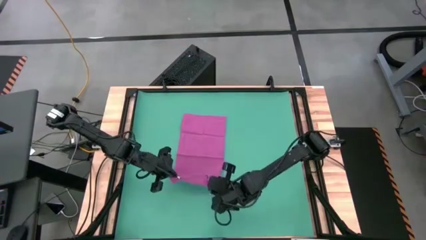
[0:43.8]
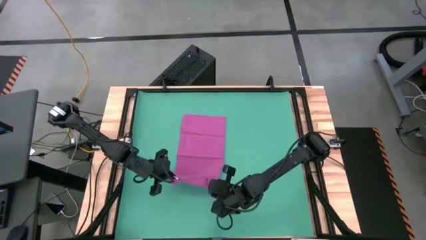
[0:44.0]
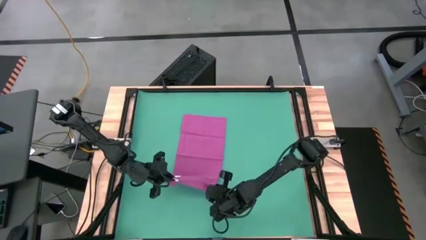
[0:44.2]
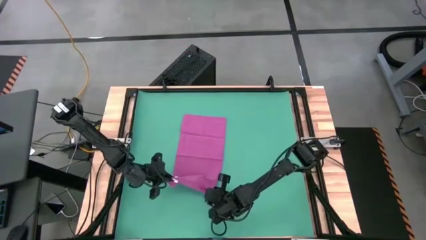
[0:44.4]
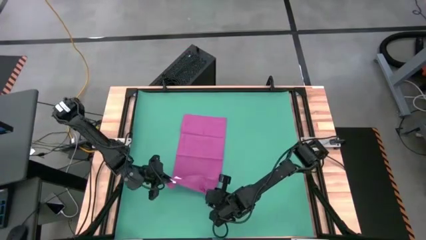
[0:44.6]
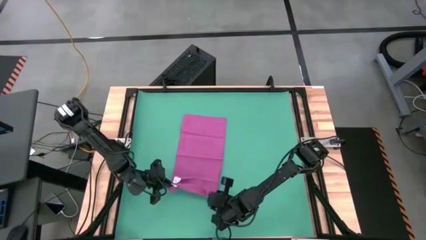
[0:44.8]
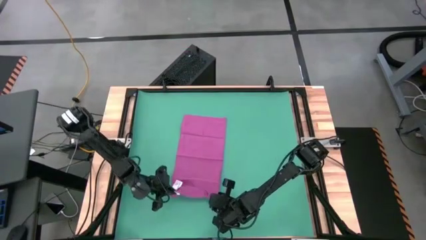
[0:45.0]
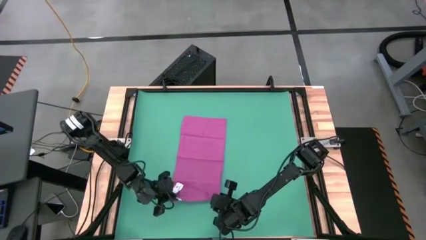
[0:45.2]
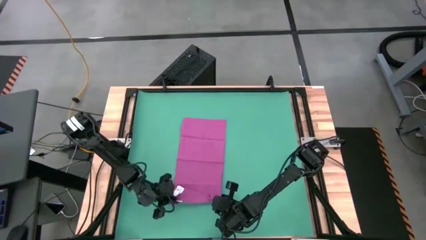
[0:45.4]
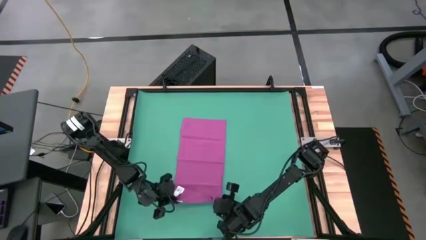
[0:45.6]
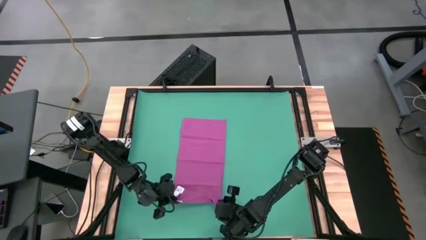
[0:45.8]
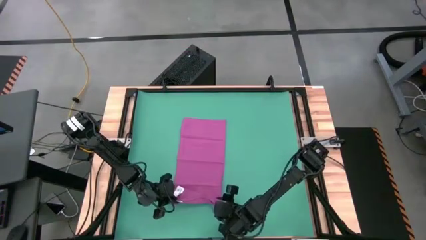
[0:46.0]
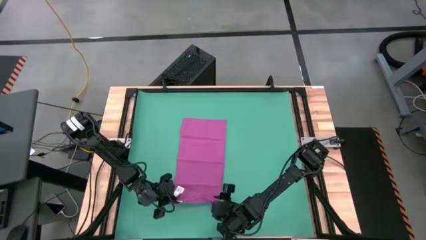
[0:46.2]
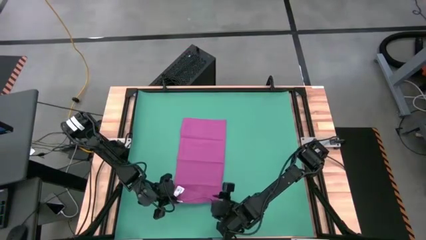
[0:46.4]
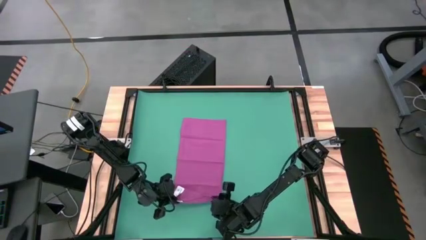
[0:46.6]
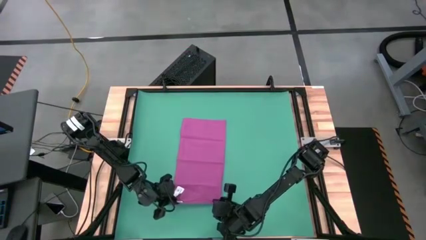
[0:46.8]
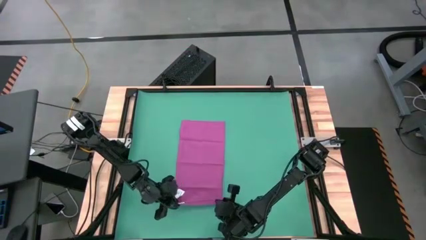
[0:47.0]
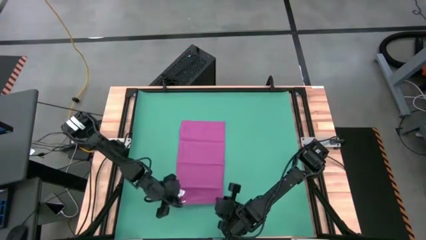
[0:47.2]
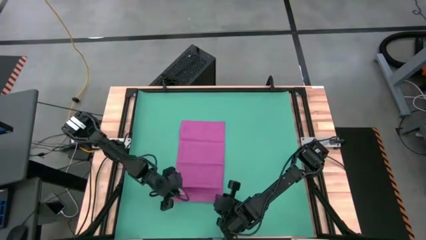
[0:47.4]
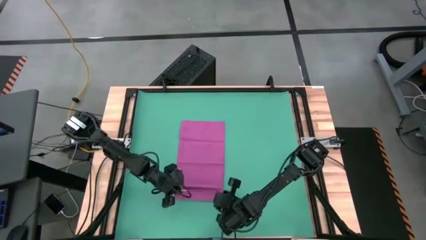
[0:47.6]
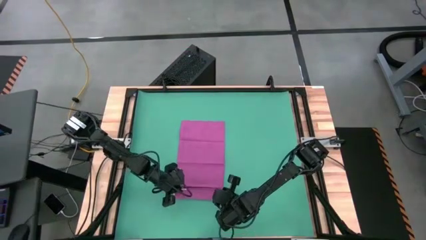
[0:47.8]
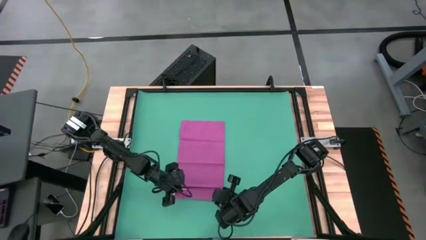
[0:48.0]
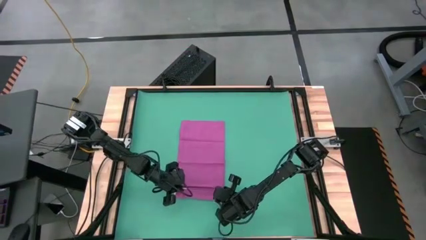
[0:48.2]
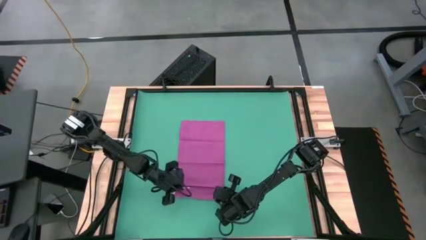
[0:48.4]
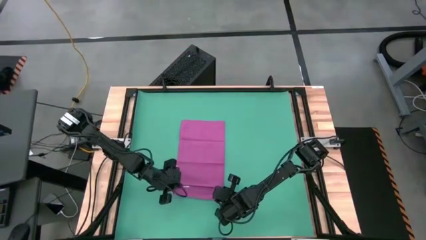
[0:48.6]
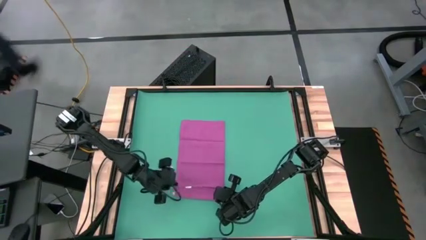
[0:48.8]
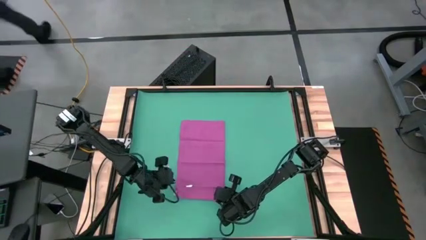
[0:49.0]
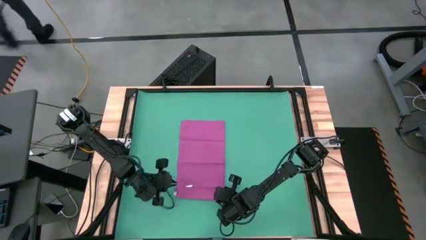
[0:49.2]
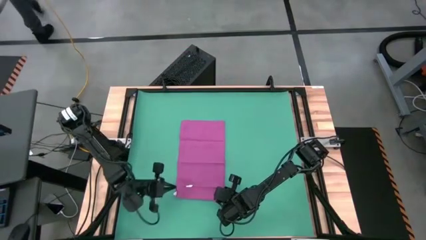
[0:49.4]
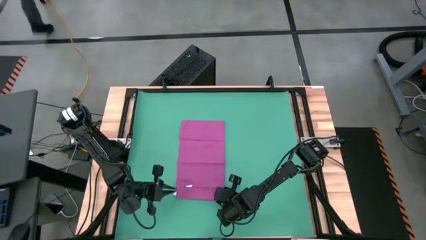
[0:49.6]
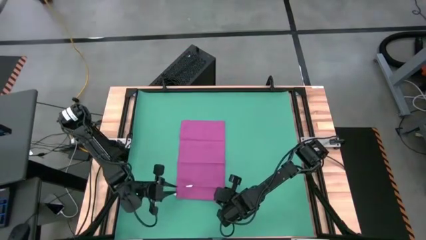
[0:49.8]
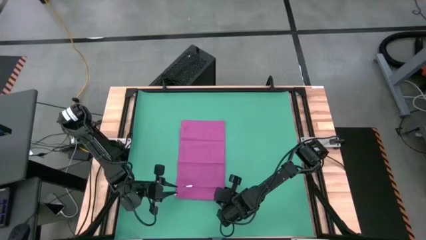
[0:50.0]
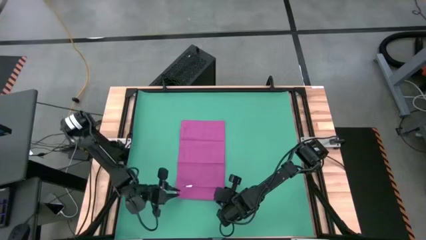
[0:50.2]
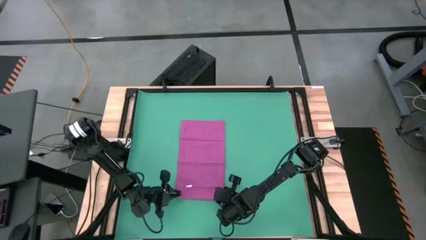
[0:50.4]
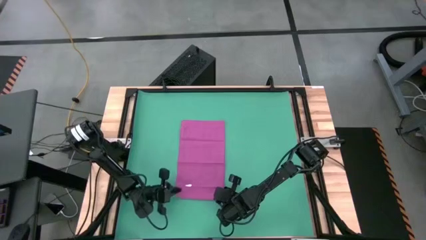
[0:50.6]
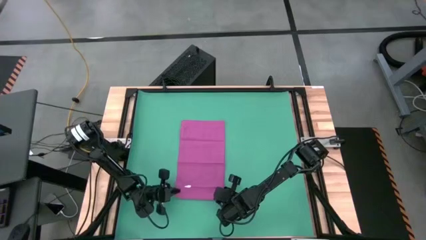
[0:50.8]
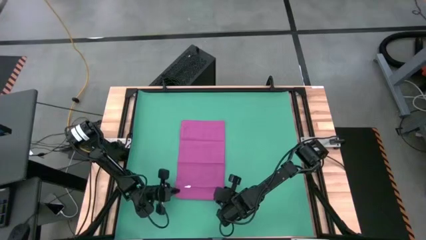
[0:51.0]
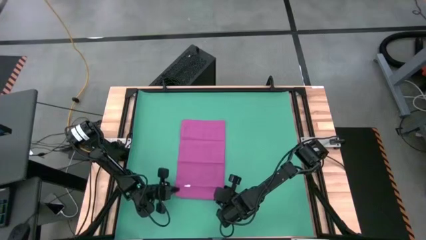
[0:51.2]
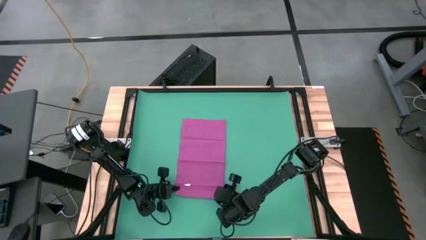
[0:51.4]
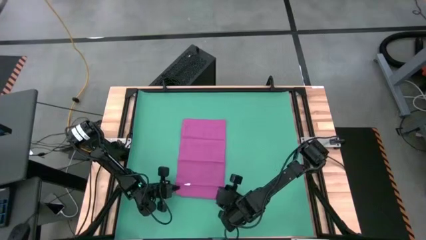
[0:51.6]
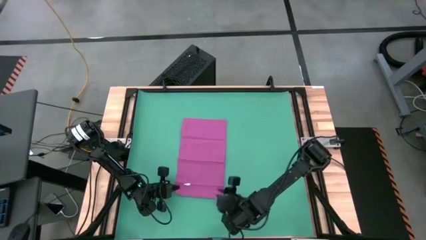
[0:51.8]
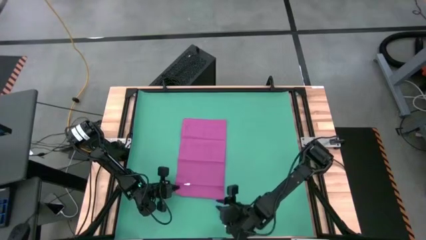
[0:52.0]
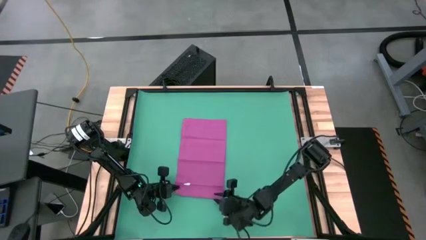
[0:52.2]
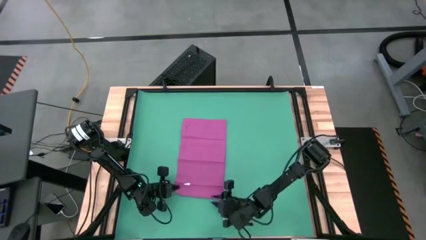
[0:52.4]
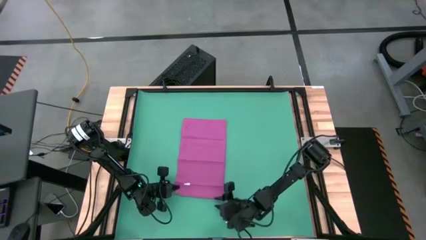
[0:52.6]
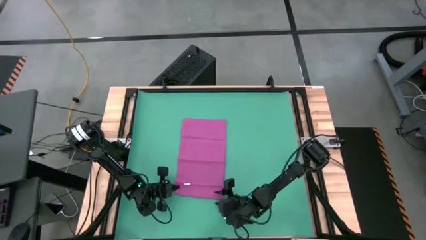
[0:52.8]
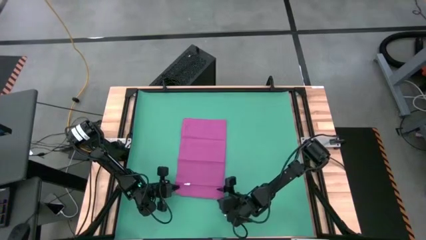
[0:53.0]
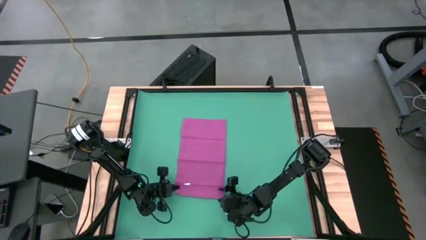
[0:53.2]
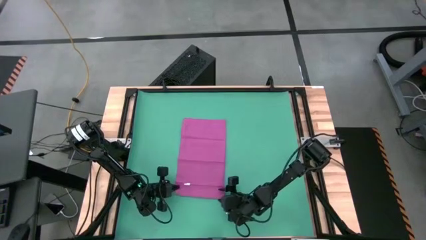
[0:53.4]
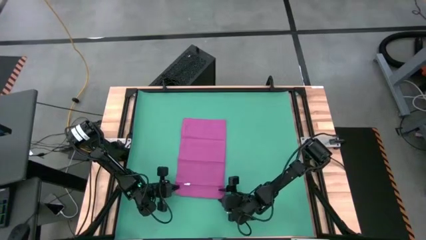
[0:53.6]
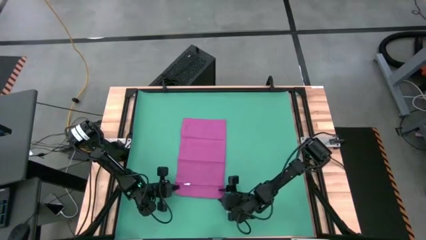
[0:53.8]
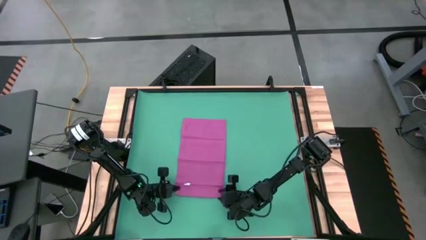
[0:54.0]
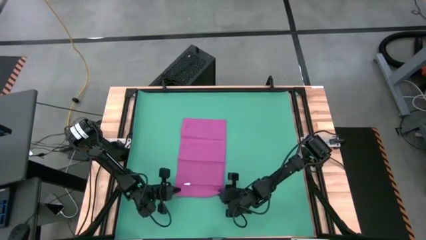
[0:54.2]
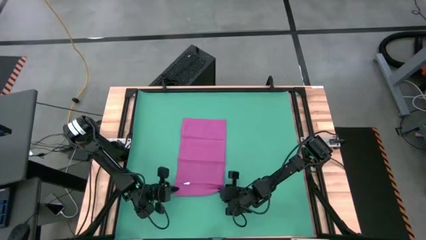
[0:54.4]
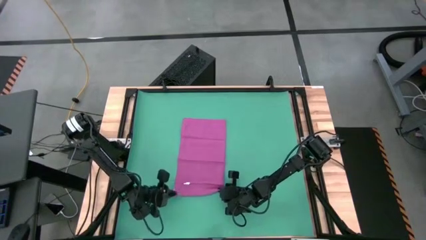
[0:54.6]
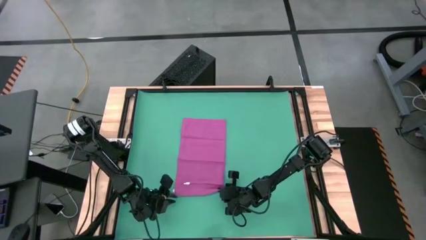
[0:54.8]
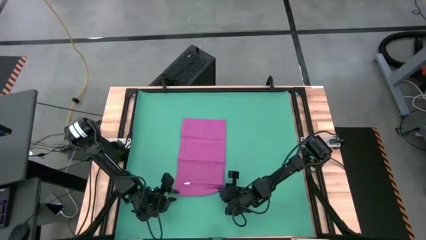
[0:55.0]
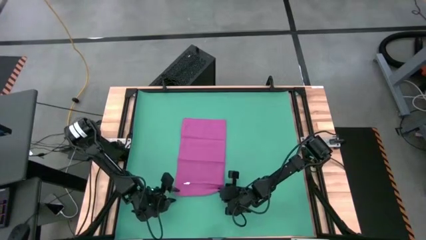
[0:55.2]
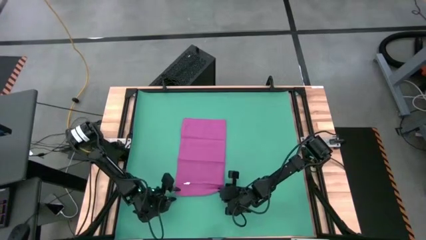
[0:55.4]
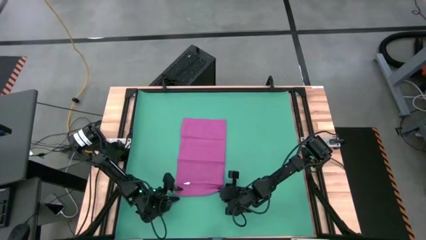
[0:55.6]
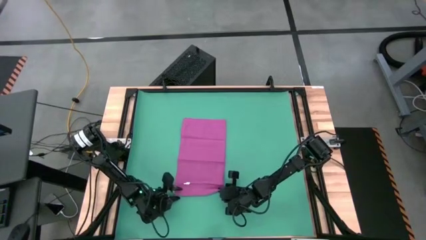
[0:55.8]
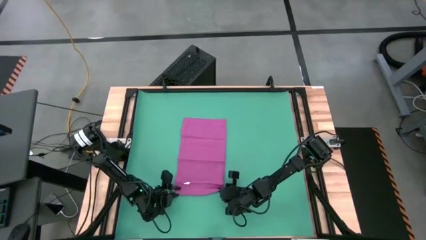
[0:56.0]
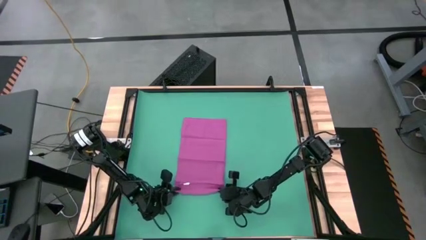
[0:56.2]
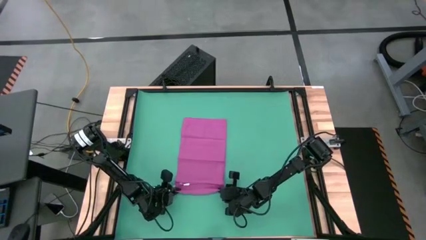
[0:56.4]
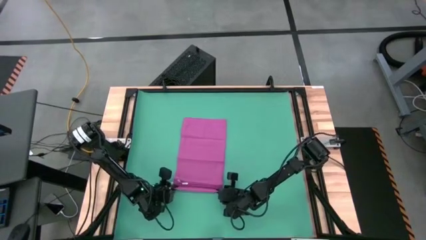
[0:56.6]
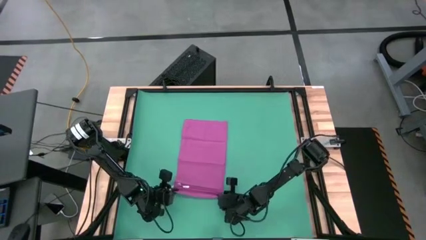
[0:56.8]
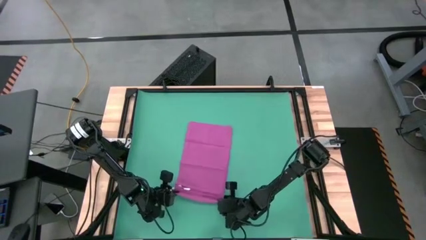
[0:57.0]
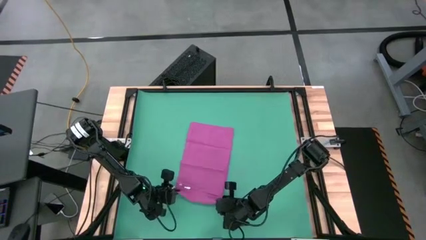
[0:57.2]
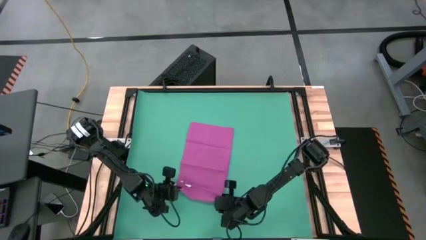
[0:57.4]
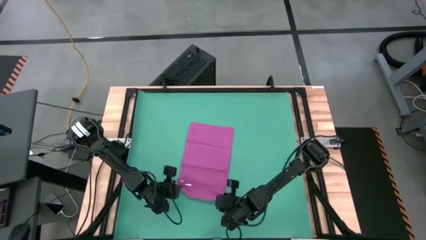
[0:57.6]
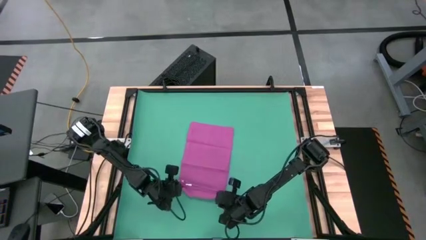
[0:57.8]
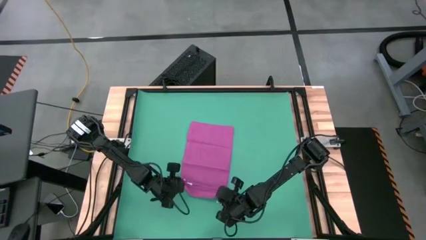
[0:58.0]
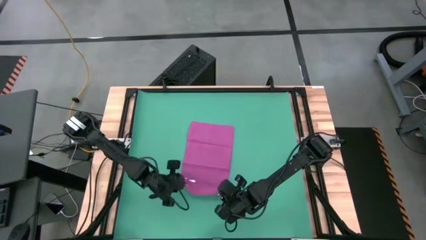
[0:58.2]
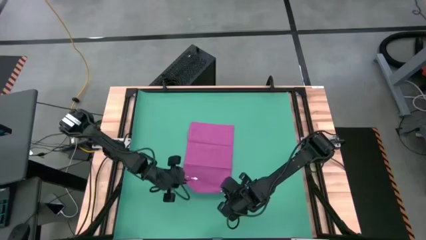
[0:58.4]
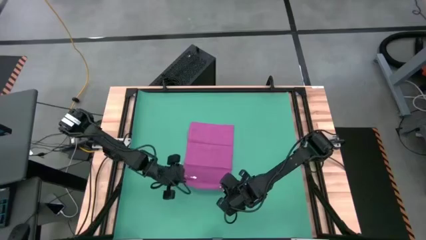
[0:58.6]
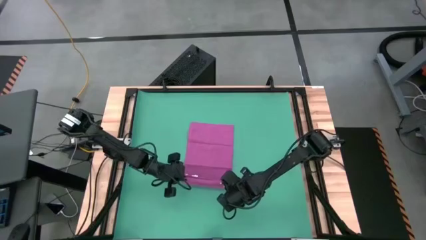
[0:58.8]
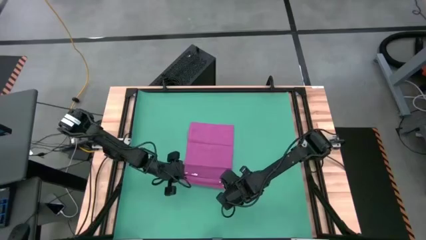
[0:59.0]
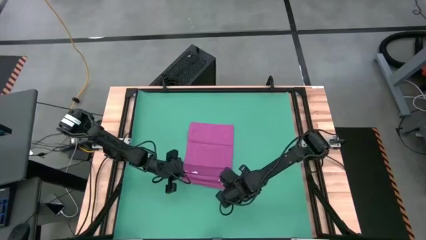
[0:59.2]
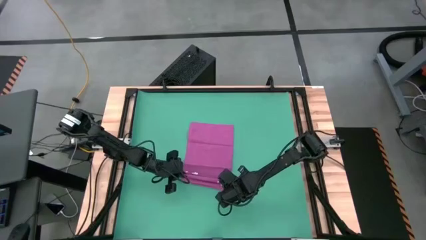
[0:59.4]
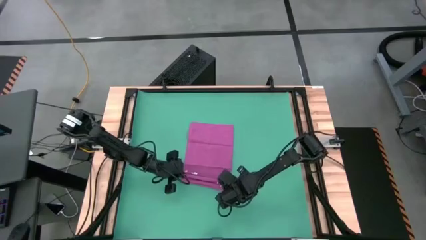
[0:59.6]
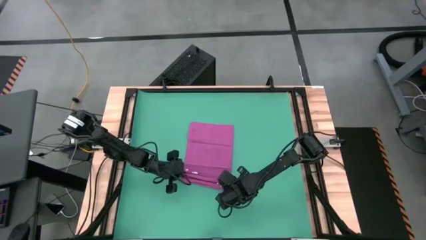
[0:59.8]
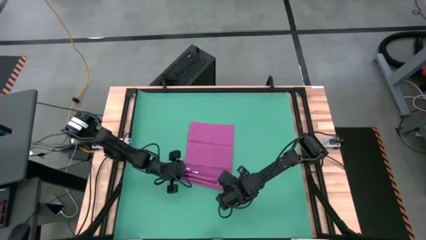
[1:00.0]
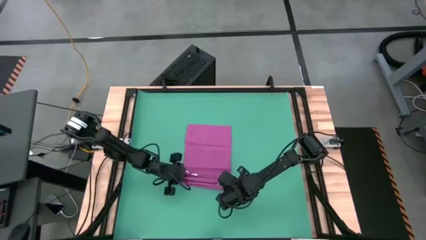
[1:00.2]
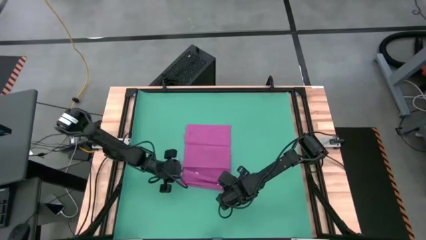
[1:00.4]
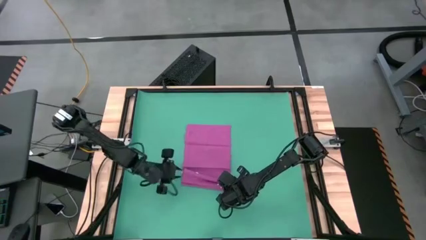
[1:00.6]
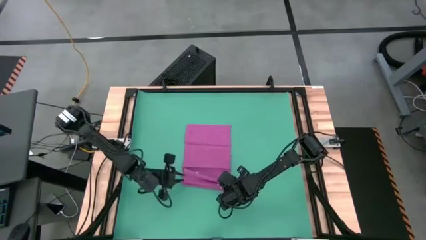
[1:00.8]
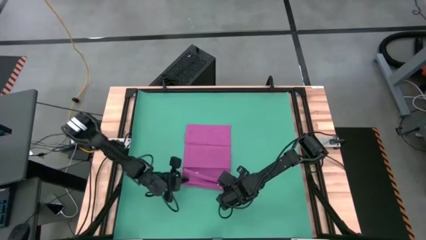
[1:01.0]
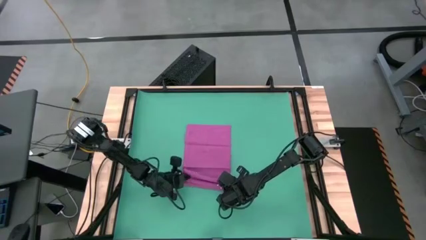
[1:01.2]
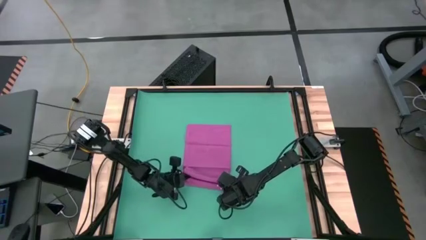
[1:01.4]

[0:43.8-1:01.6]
Task: Roll towel
Roll the pink towel
